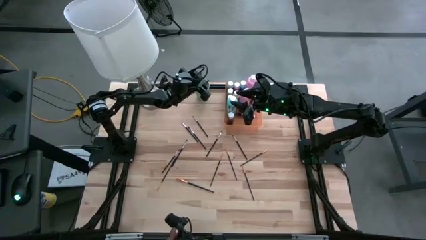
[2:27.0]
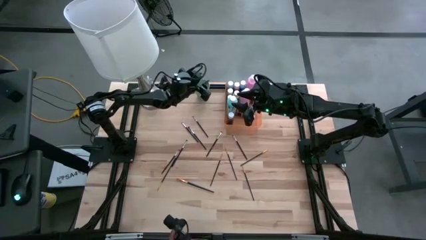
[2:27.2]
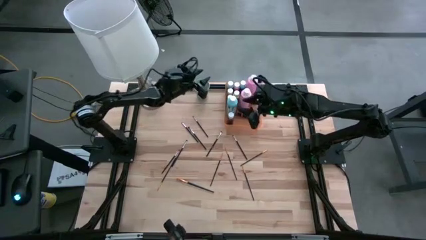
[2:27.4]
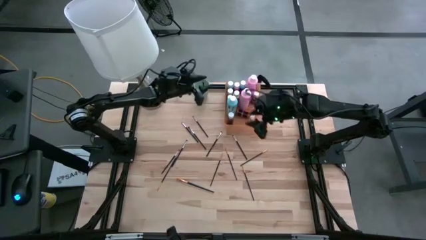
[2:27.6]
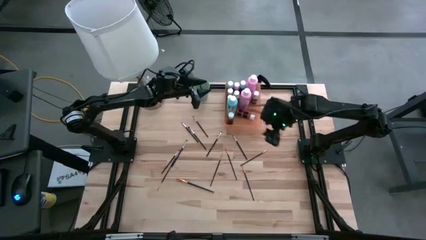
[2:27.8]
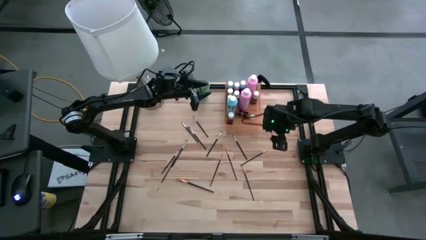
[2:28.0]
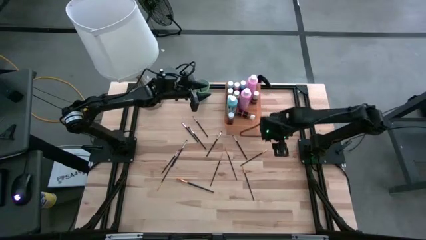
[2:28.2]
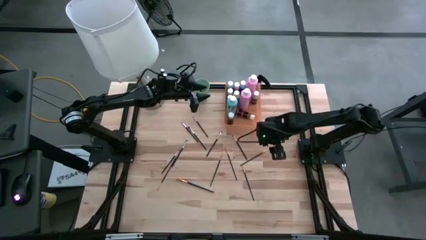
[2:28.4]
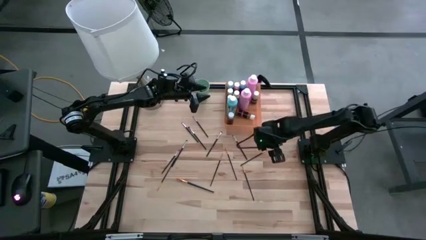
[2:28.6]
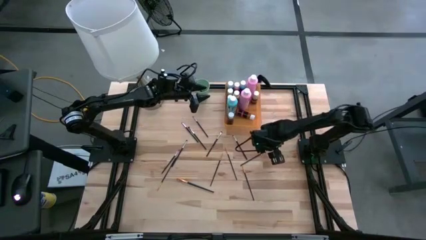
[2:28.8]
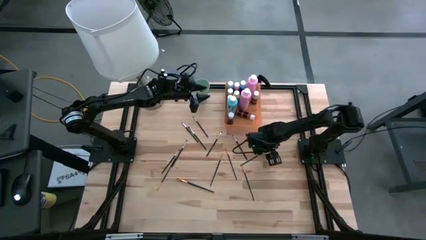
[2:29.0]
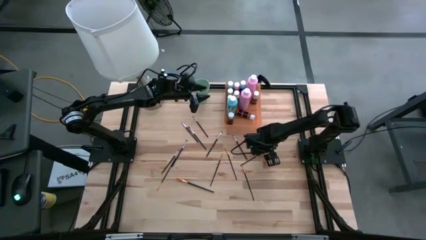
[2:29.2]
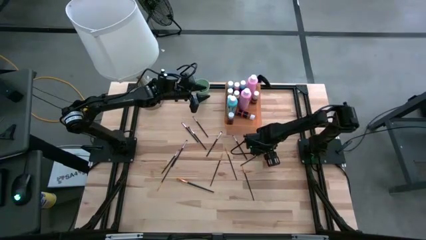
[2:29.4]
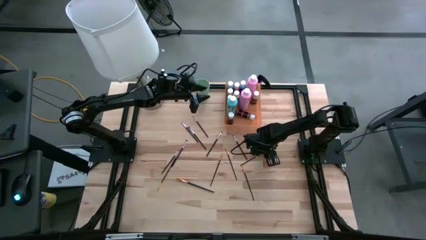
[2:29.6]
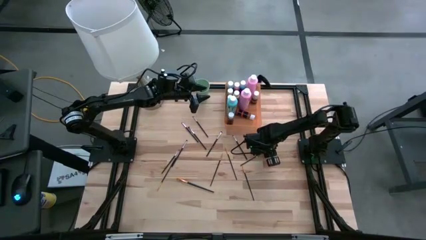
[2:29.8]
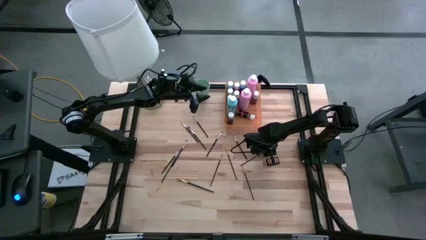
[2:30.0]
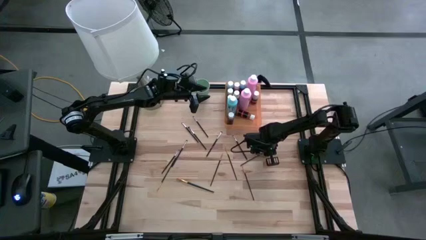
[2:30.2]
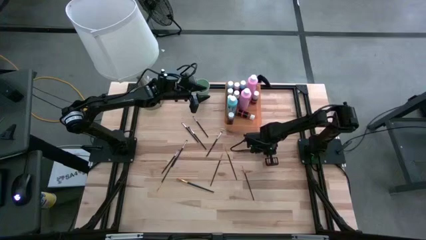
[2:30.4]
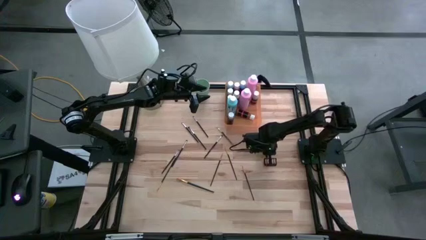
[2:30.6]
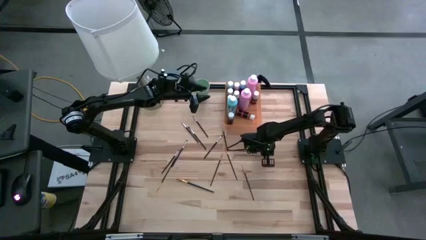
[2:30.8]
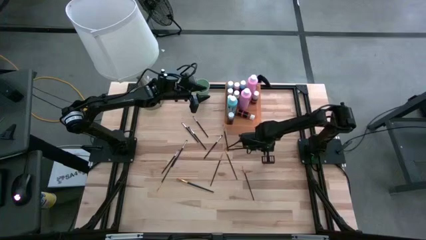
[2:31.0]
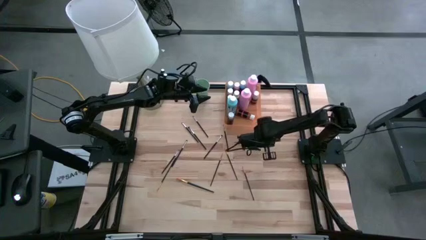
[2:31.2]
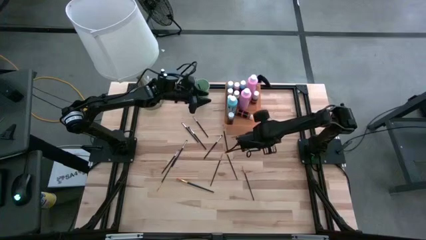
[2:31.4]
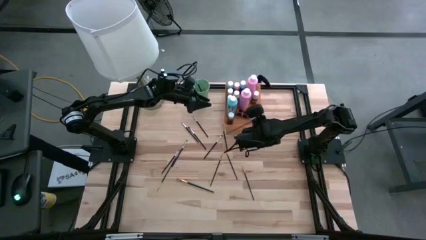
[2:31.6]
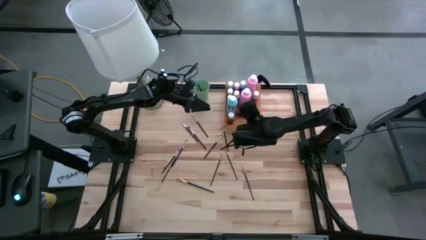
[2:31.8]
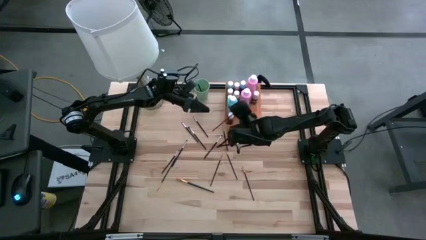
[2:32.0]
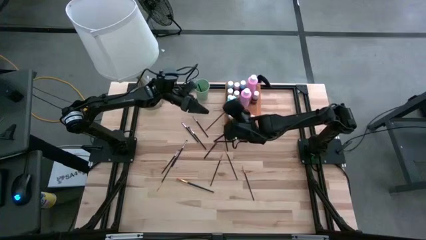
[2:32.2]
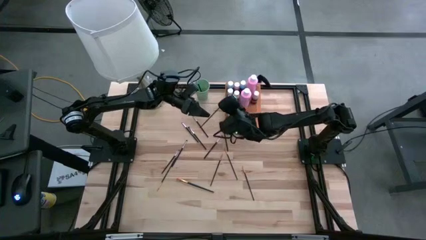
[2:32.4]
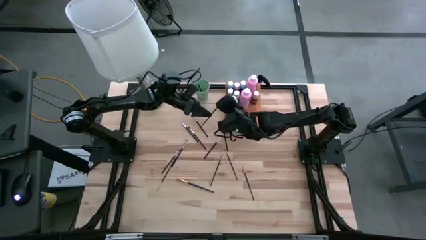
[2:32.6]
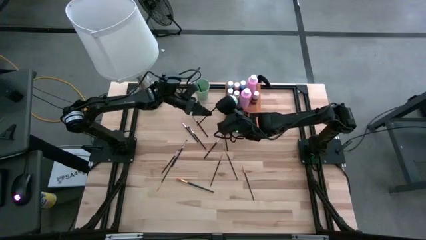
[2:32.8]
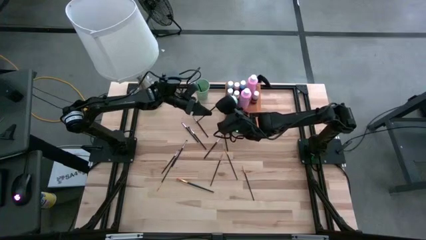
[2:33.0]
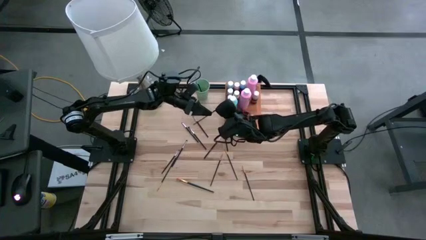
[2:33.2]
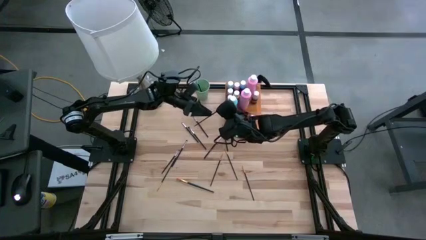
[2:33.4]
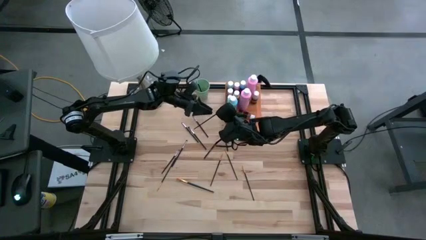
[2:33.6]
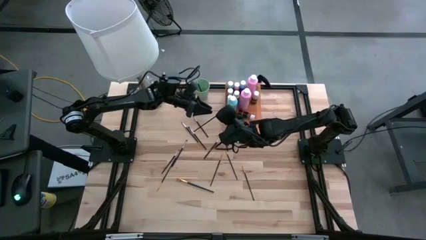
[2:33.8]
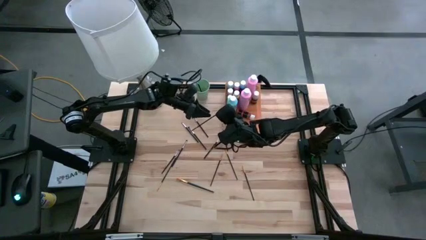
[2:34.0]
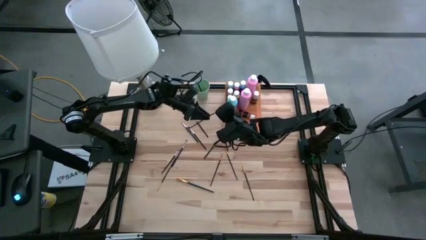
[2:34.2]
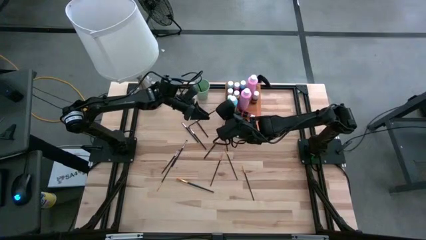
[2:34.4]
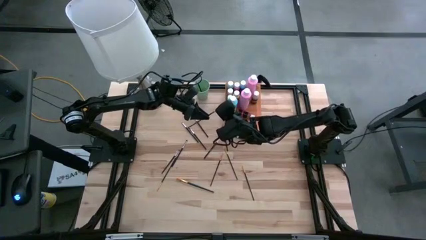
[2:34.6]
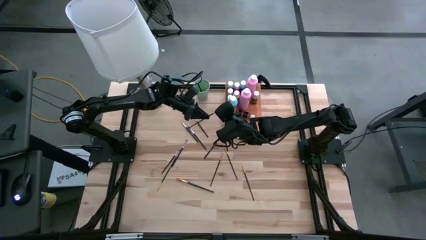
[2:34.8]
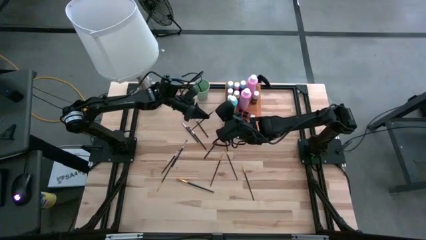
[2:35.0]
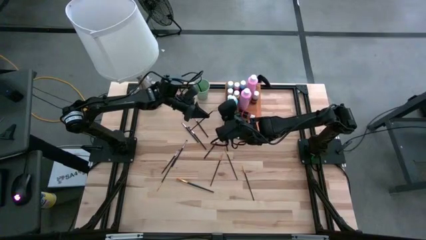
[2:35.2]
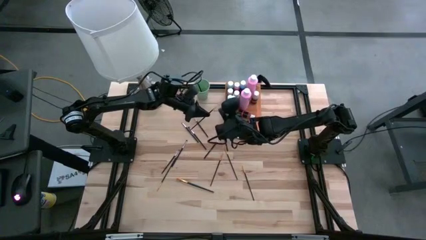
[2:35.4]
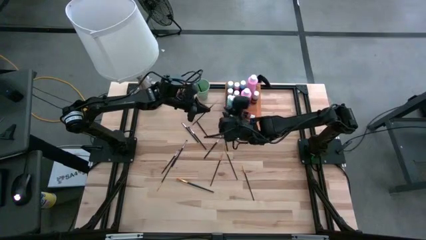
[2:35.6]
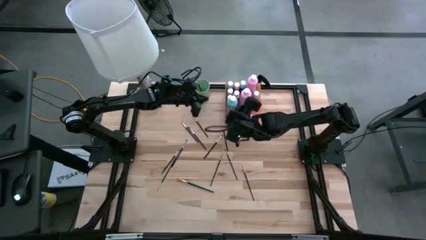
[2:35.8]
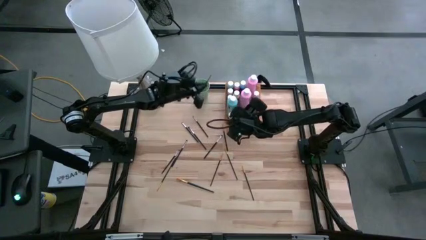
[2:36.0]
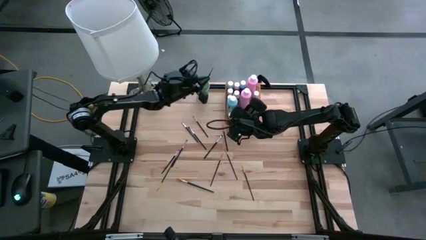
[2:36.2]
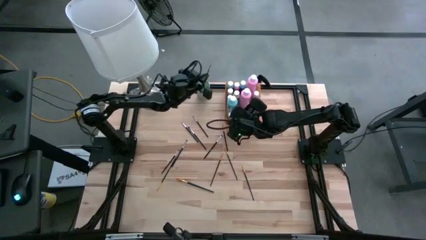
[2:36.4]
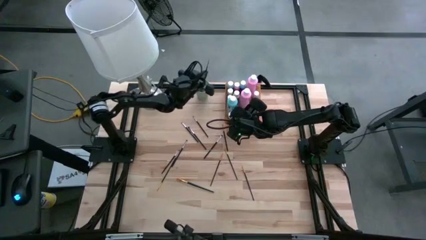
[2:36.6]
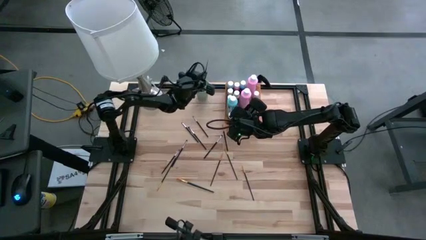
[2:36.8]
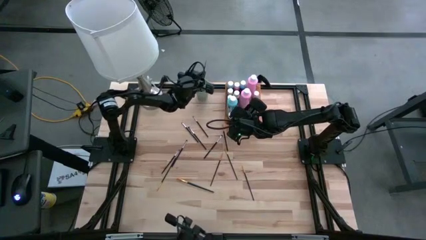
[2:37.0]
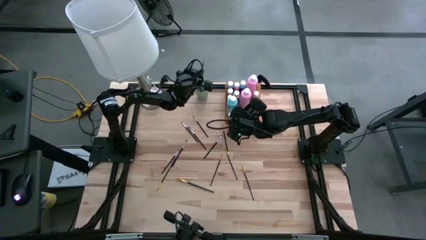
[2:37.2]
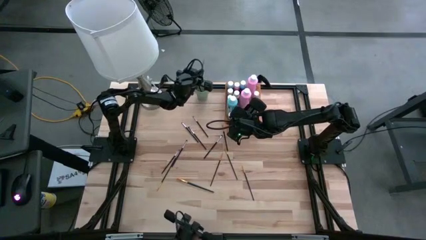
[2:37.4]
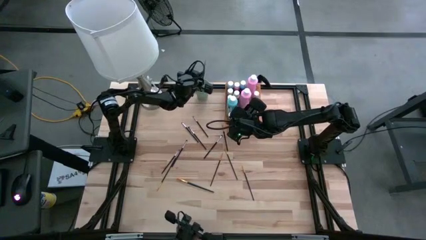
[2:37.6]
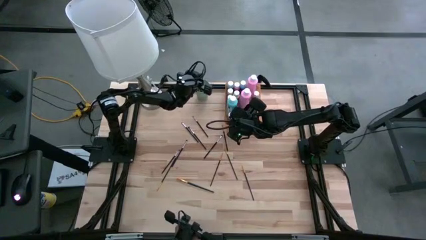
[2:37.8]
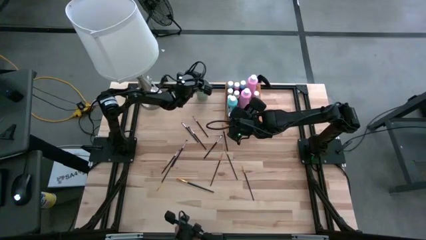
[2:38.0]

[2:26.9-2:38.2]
Task: Pick & Place Paint Supplies
Put the yellow paint brush into the green cup
